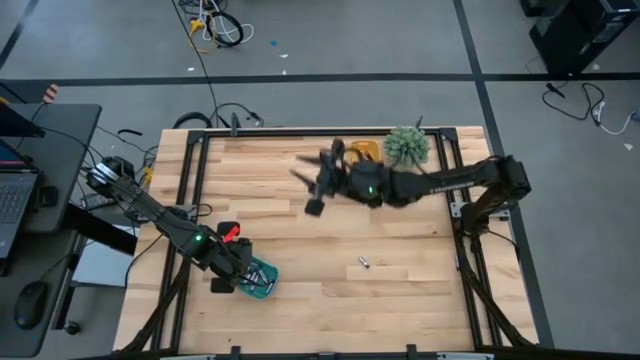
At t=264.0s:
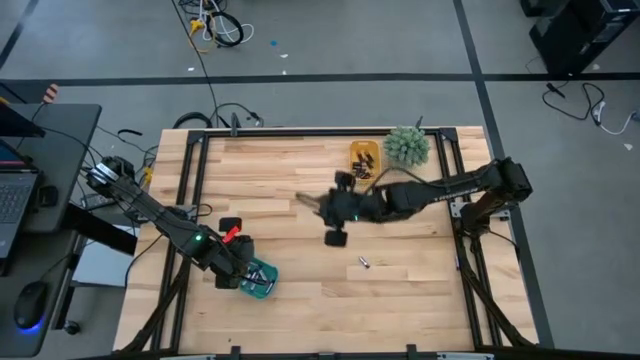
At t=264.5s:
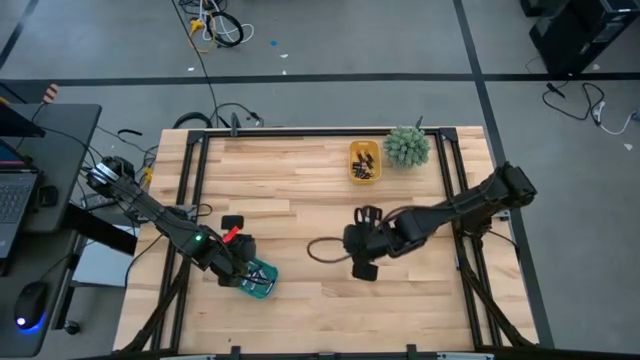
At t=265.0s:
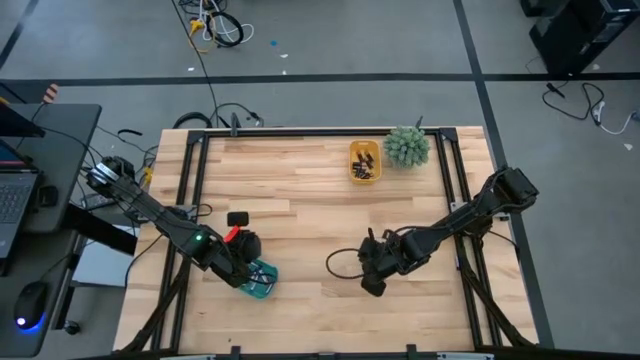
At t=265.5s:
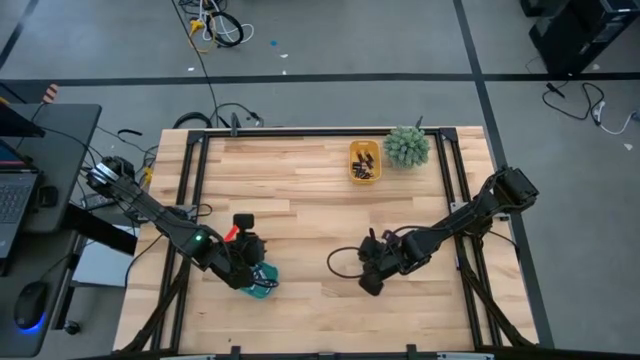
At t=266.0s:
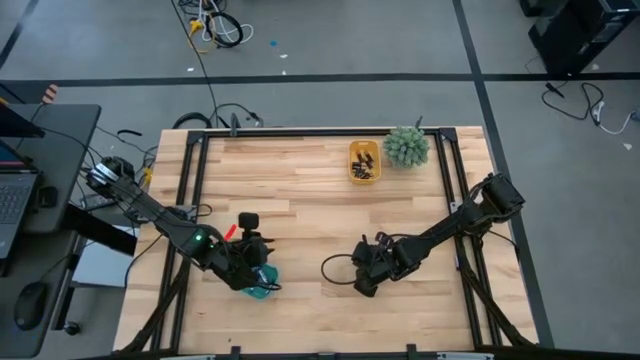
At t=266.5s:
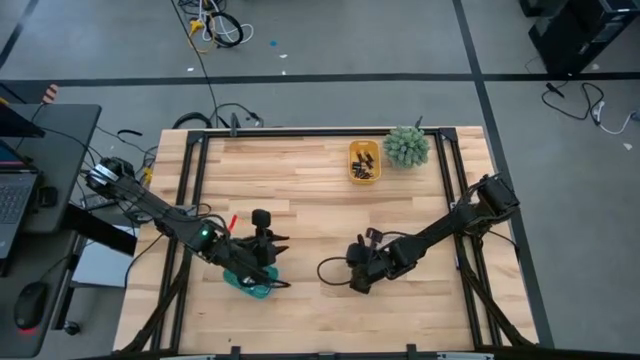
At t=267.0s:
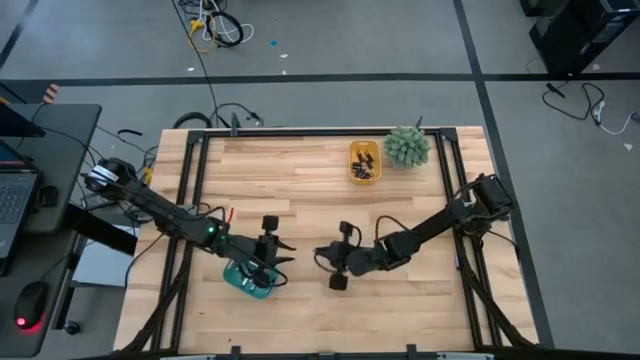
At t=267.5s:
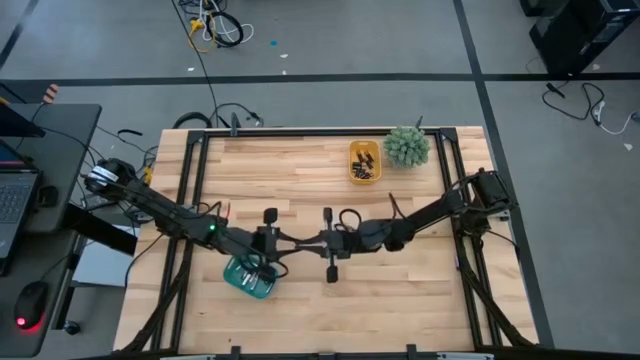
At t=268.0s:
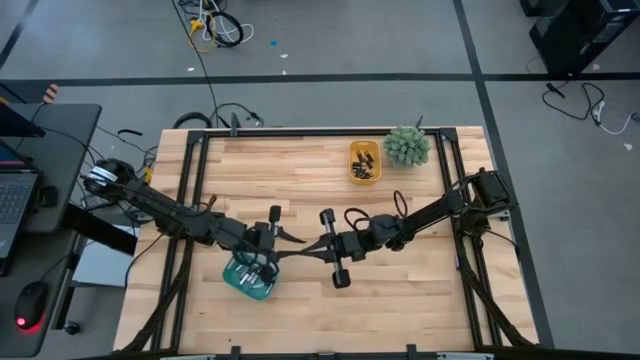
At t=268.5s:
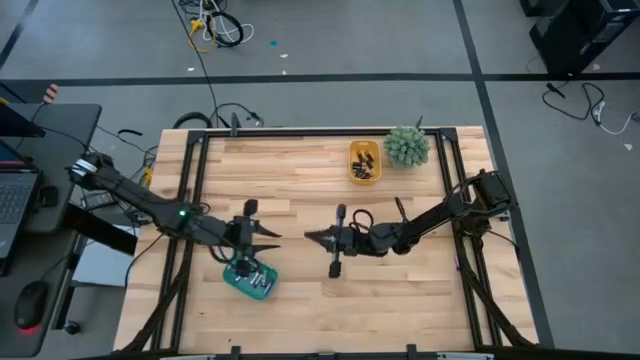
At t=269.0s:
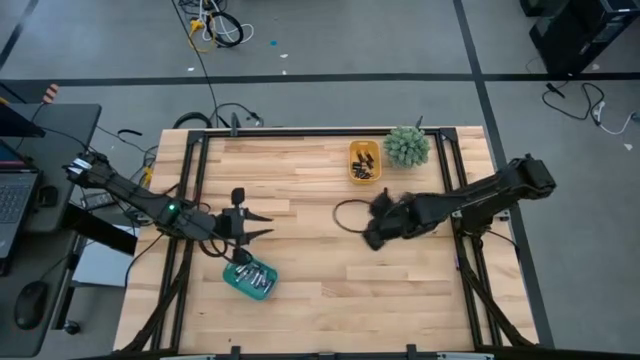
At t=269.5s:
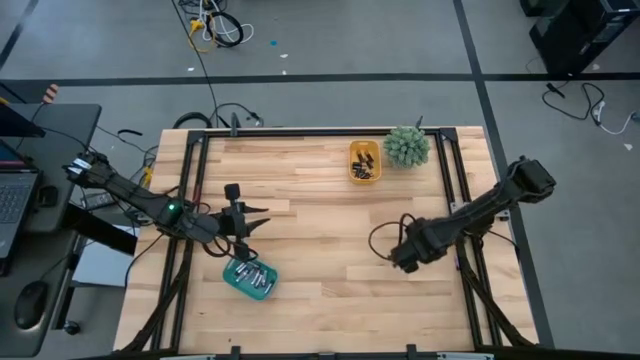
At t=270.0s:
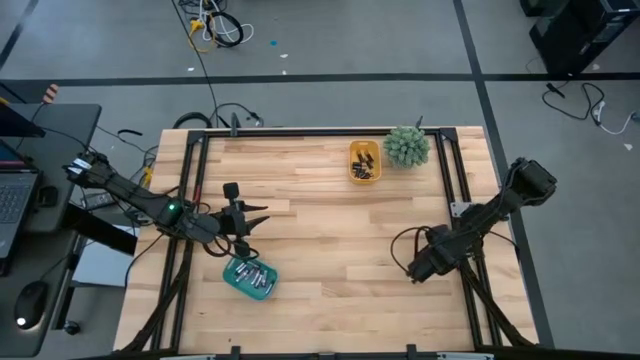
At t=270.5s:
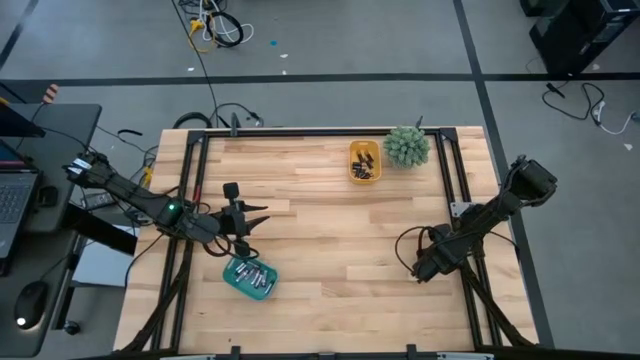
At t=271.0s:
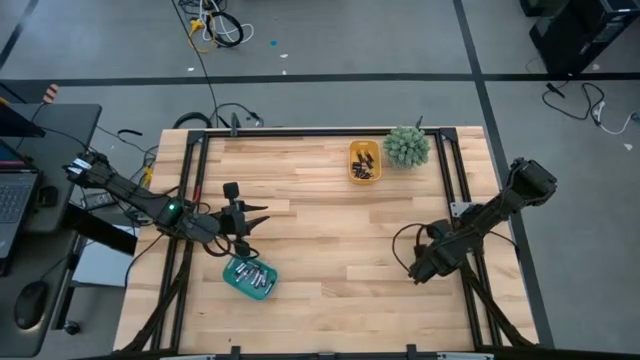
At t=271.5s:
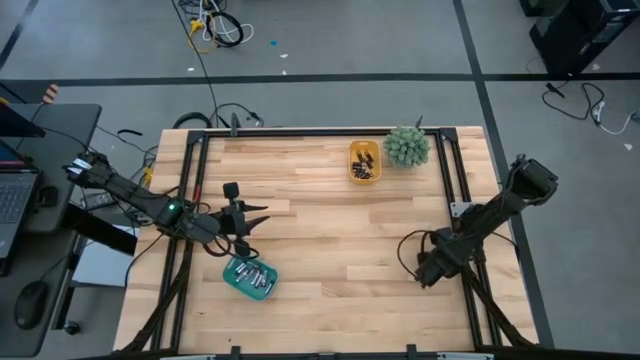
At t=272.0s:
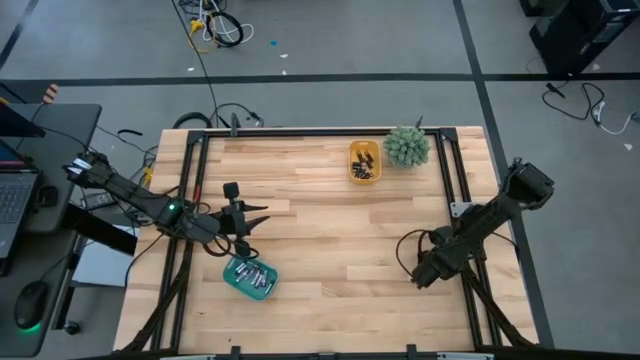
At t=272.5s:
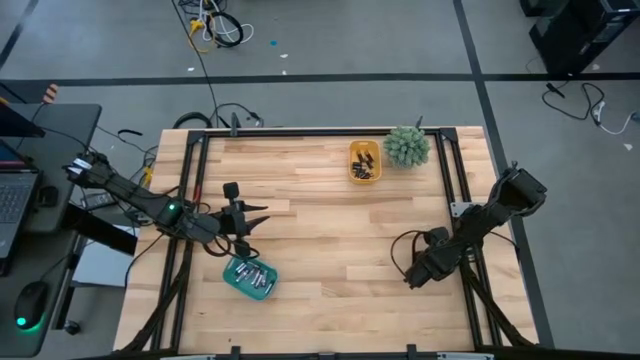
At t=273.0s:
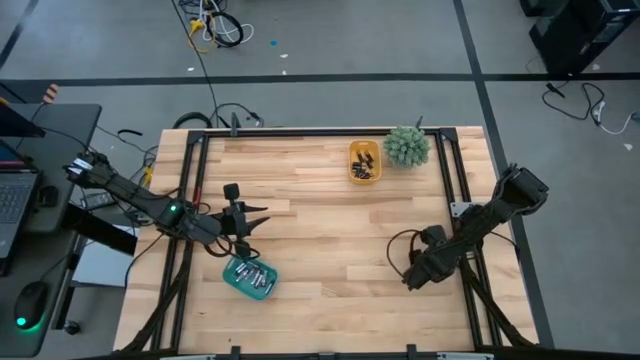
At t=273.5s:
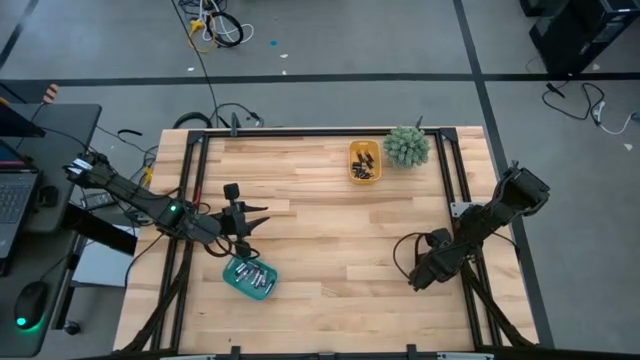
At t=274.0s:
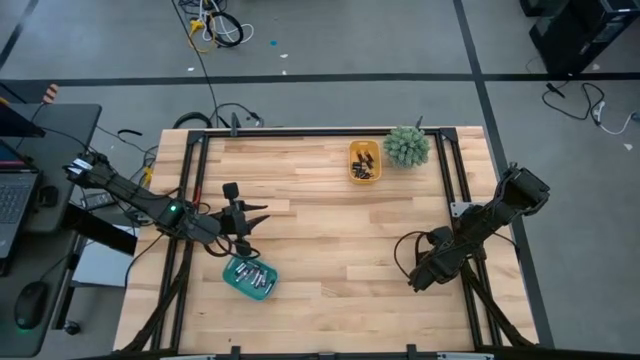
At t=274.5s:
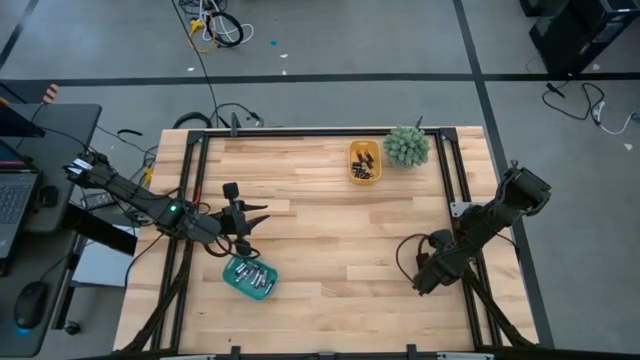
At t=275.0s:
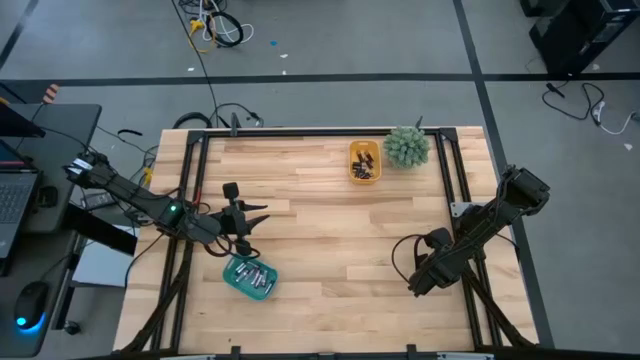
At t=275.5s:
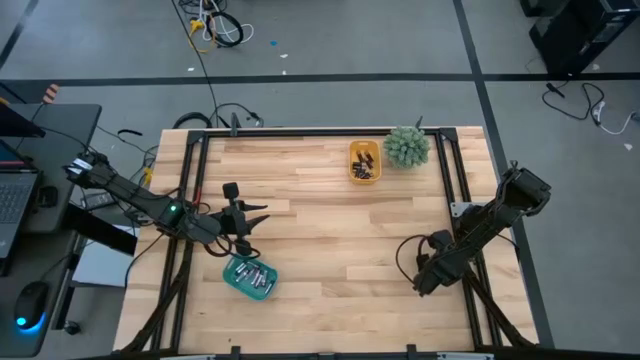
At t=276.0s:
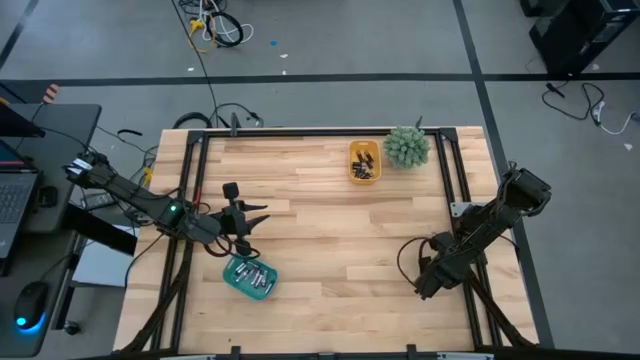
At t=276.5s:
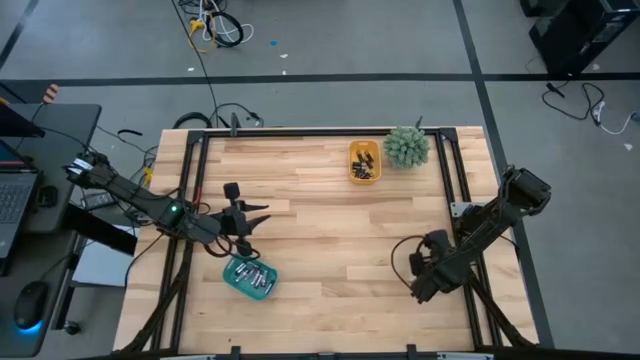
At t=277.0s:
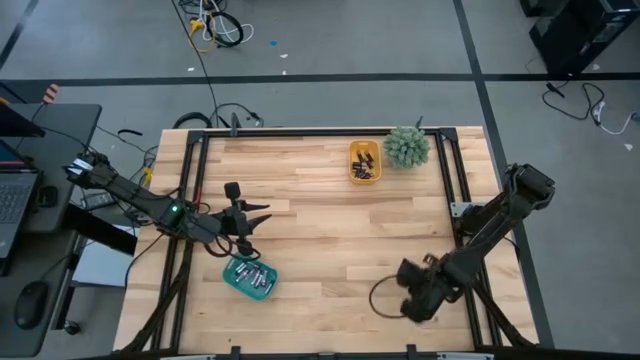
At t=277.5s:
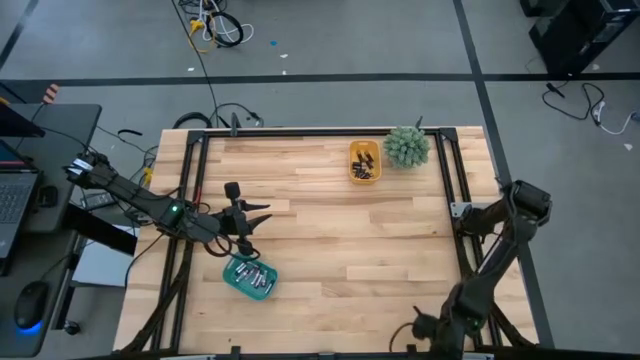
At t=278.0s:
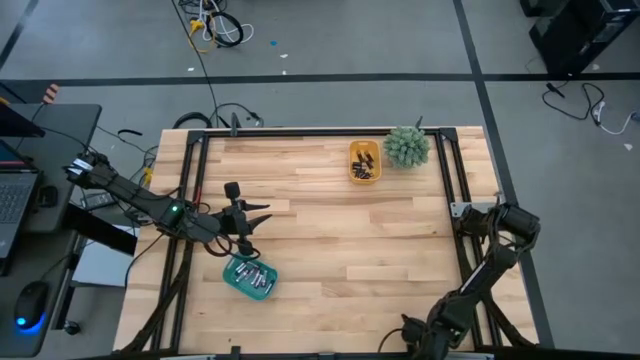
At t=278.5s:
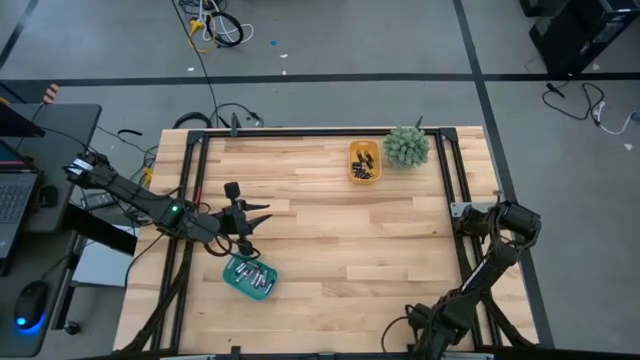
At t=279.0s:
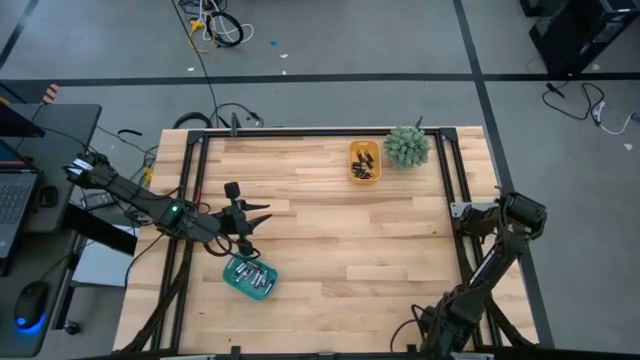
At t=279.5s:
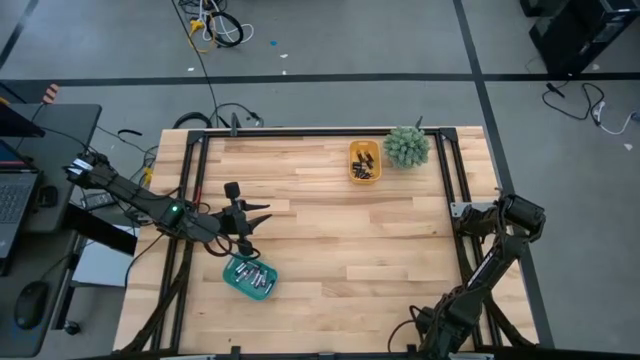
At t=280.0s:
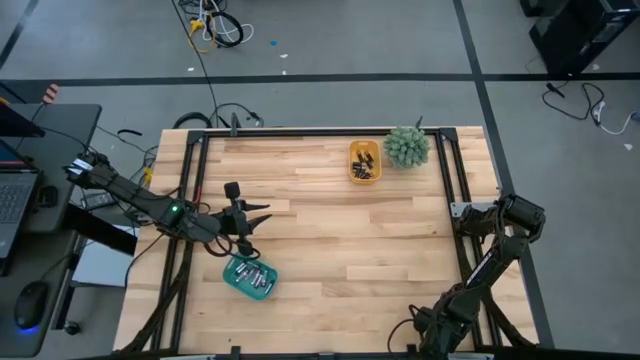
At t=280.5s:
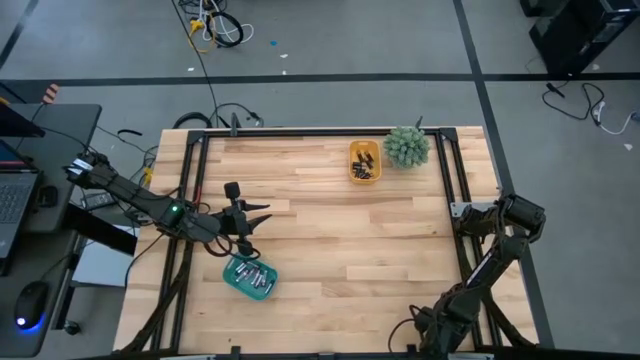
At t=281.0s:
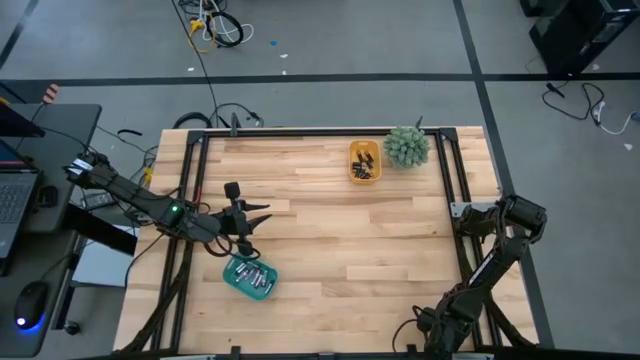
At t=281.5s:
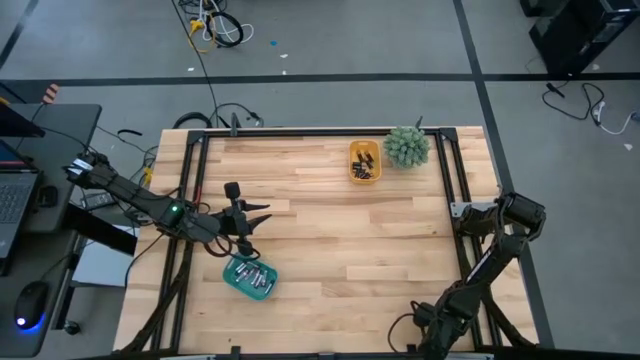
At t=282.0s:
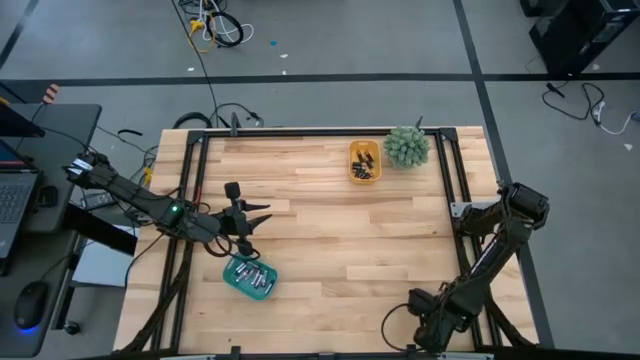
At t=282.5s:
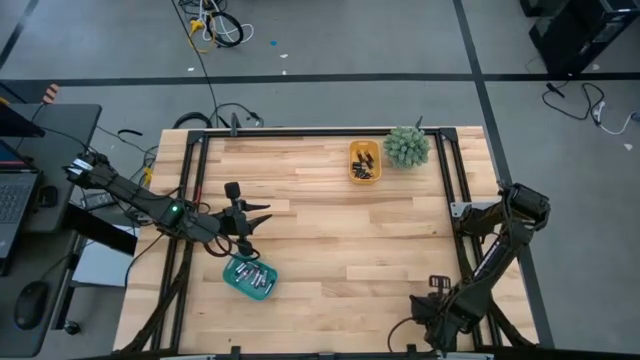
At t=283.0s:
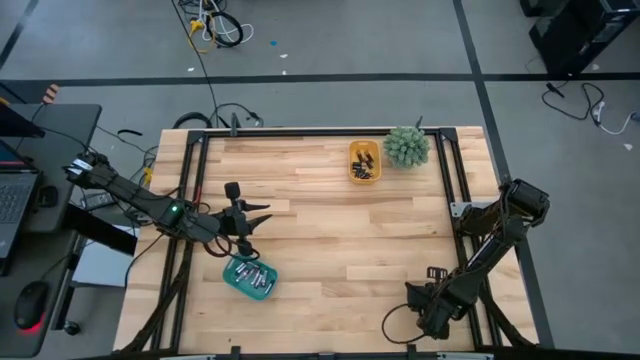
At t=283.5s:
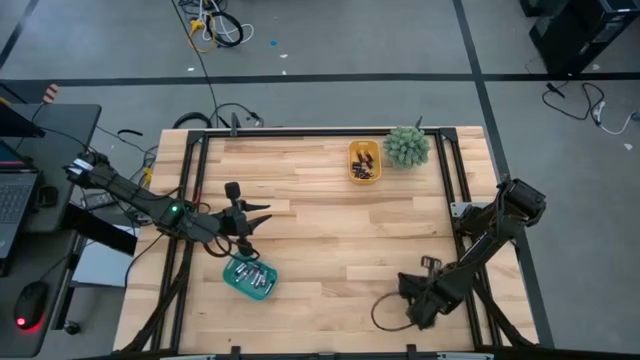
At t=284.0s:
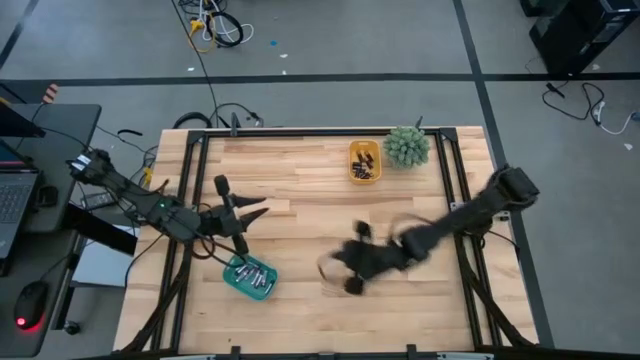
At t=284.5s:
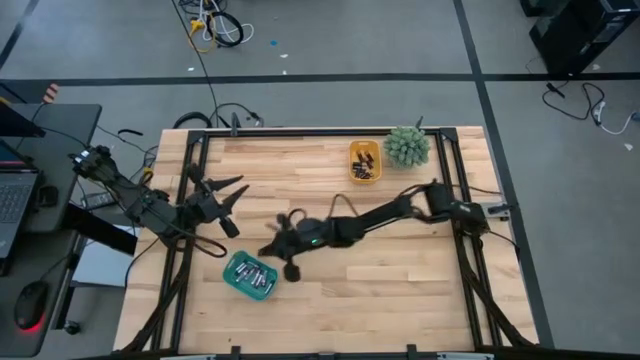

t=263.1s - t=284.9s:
Task: Sort batteries
Put the silver battery into the green bin
